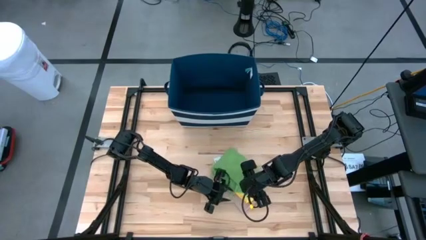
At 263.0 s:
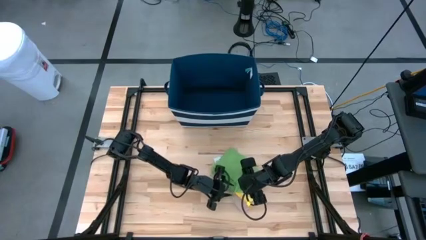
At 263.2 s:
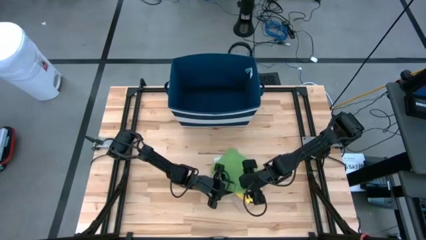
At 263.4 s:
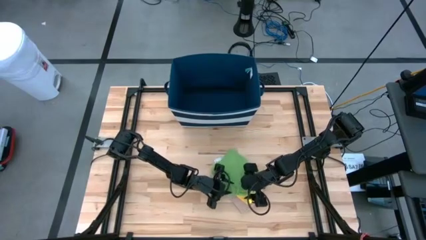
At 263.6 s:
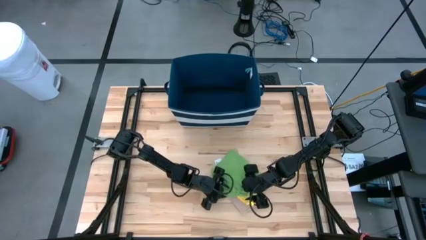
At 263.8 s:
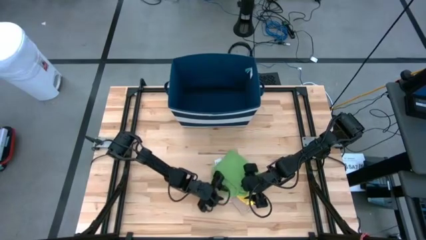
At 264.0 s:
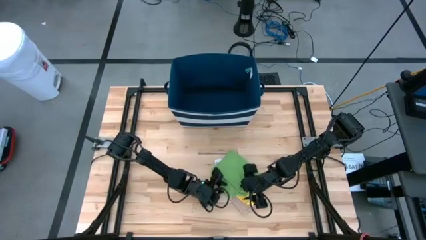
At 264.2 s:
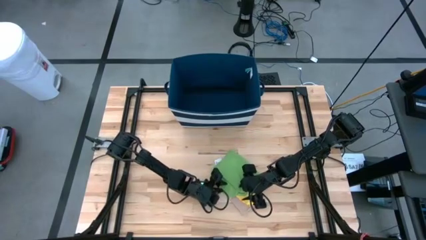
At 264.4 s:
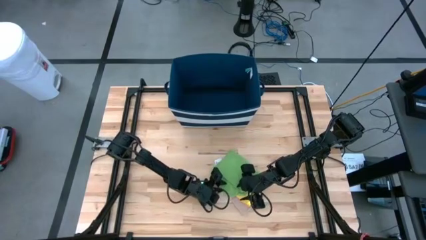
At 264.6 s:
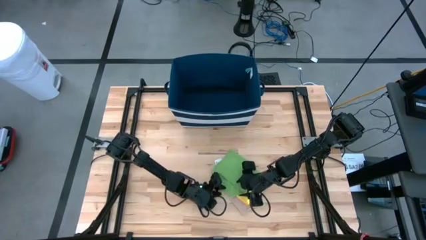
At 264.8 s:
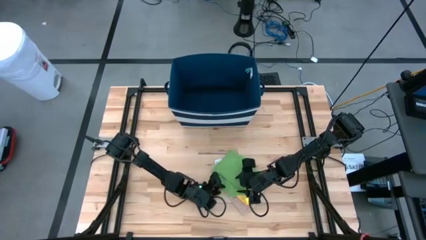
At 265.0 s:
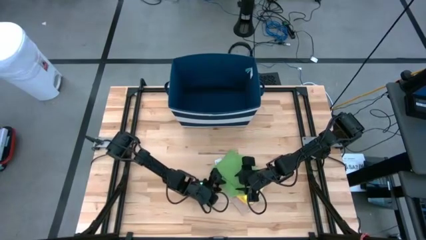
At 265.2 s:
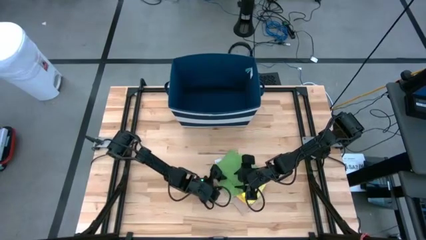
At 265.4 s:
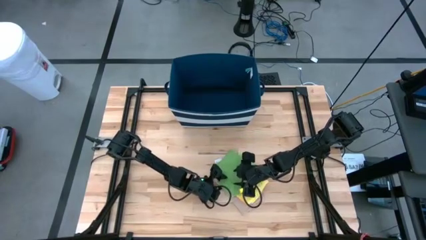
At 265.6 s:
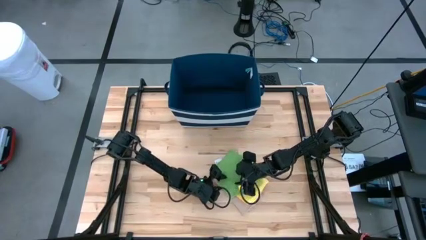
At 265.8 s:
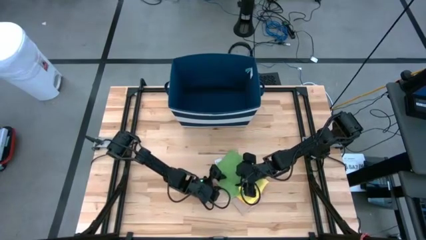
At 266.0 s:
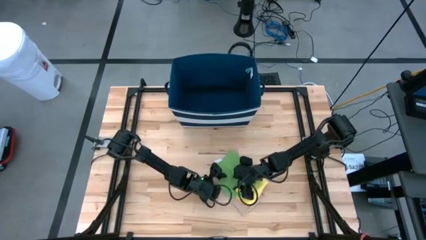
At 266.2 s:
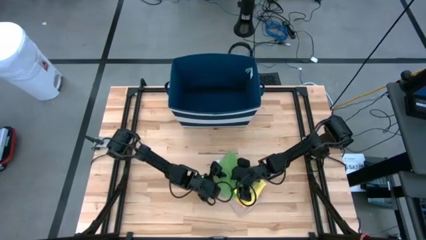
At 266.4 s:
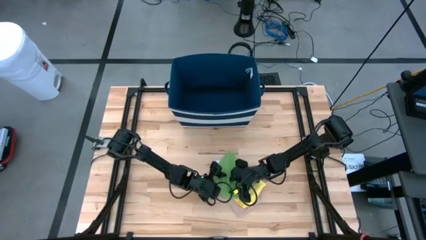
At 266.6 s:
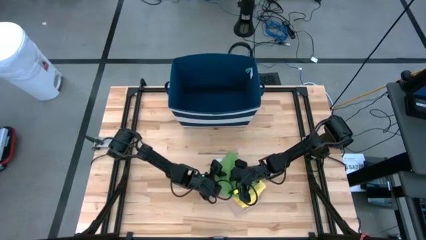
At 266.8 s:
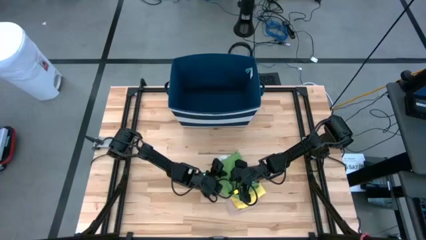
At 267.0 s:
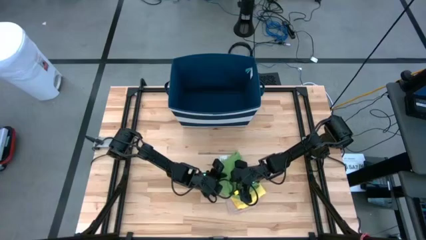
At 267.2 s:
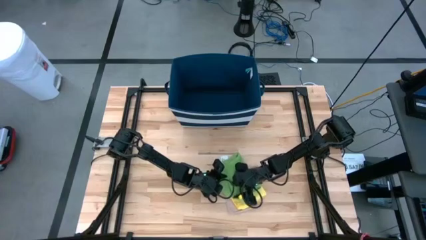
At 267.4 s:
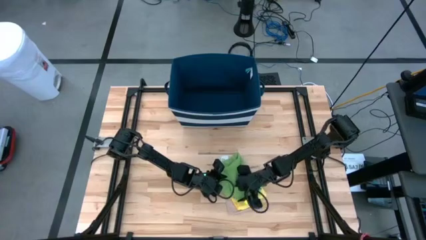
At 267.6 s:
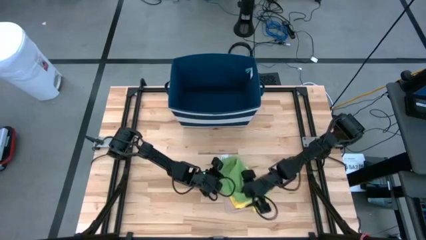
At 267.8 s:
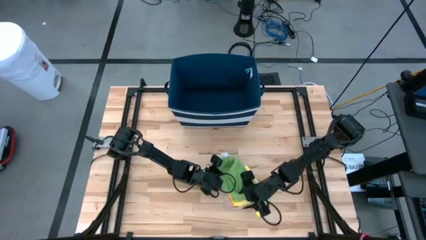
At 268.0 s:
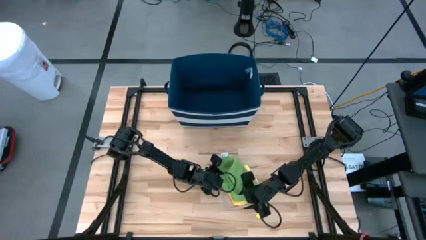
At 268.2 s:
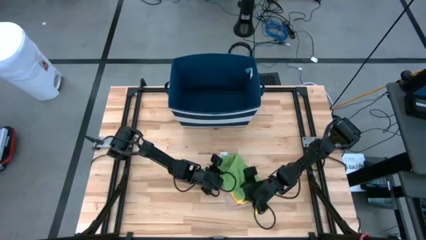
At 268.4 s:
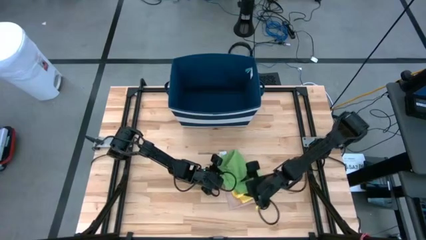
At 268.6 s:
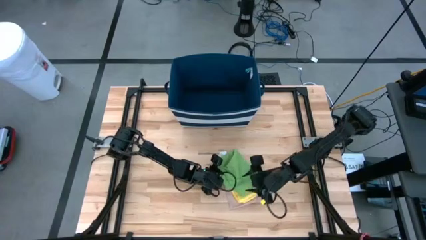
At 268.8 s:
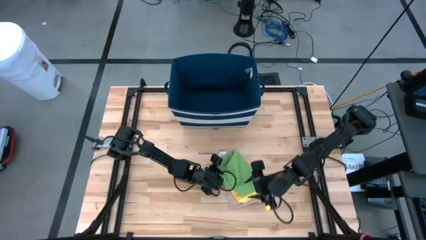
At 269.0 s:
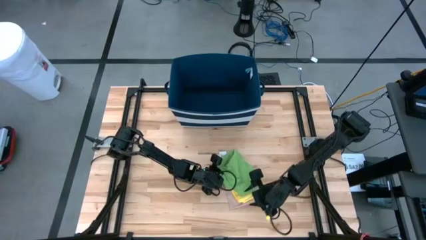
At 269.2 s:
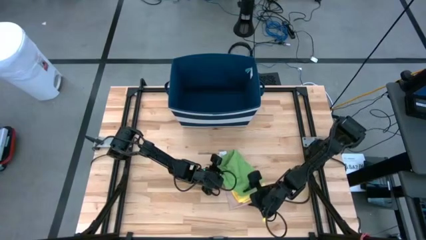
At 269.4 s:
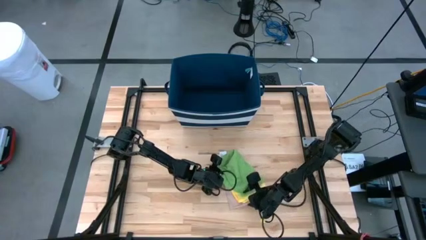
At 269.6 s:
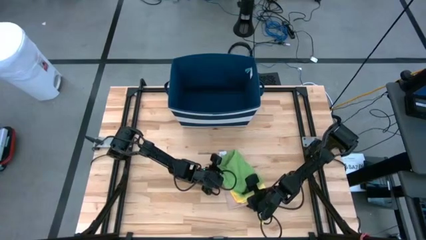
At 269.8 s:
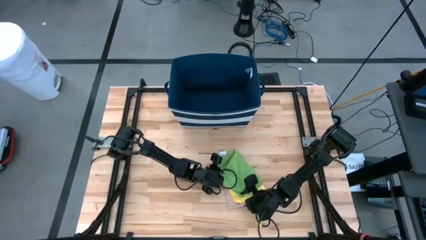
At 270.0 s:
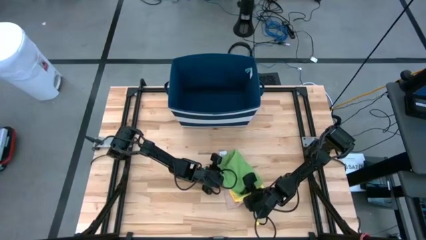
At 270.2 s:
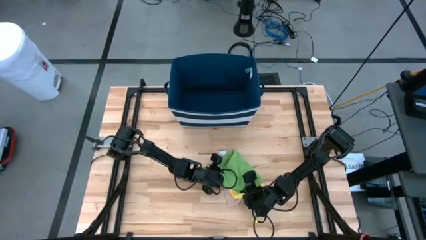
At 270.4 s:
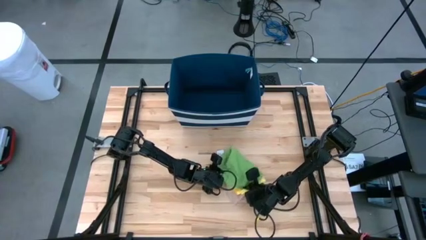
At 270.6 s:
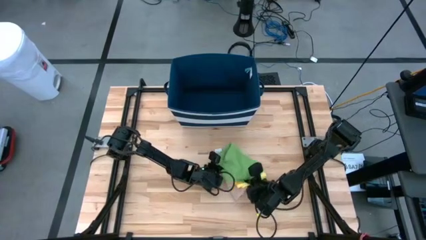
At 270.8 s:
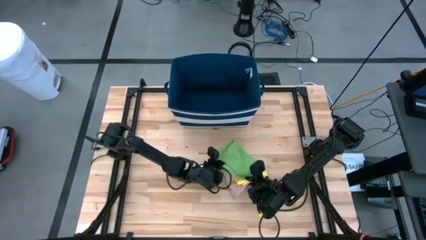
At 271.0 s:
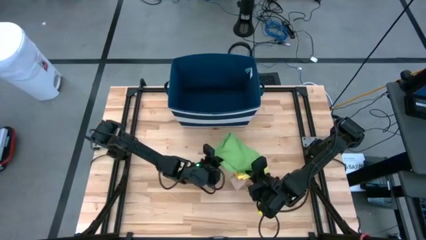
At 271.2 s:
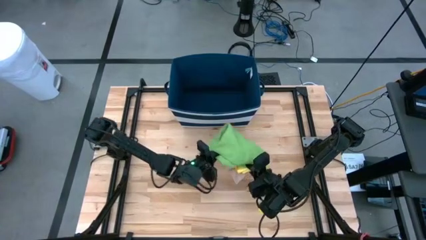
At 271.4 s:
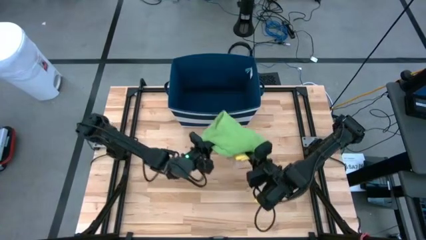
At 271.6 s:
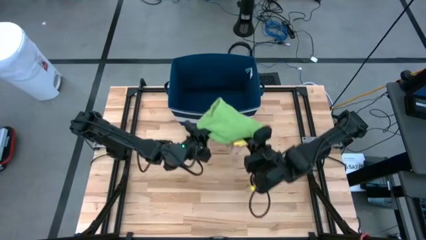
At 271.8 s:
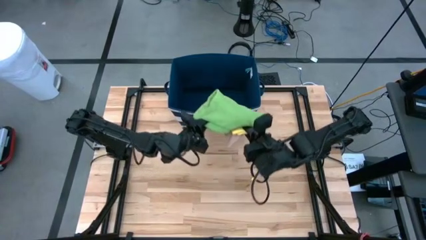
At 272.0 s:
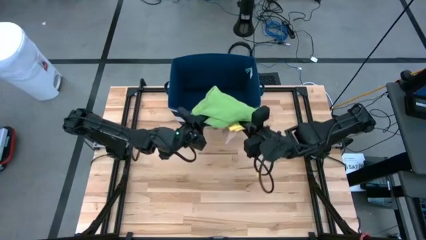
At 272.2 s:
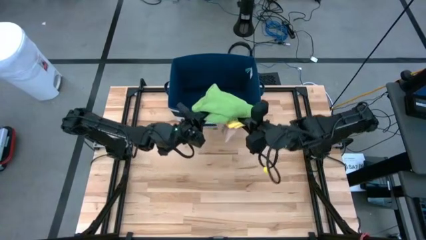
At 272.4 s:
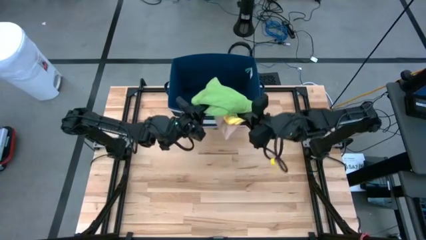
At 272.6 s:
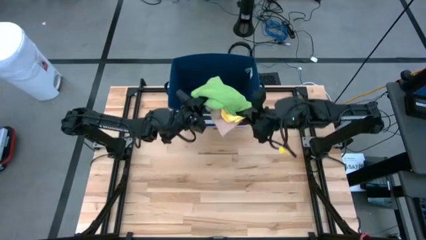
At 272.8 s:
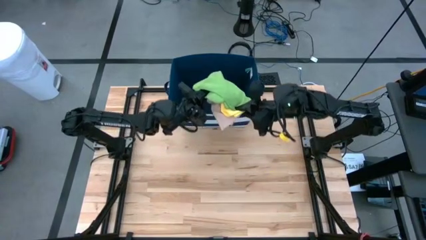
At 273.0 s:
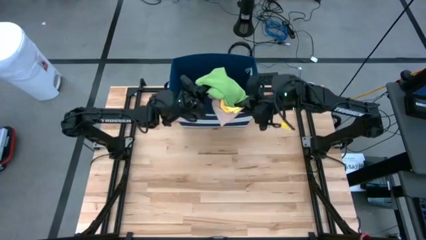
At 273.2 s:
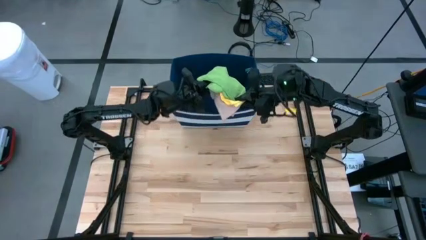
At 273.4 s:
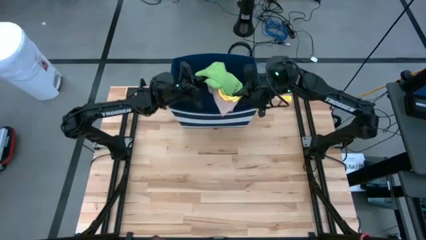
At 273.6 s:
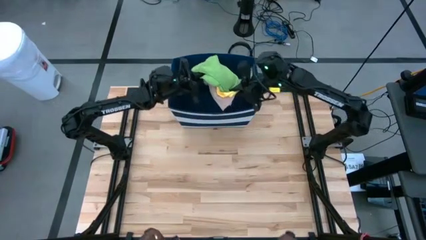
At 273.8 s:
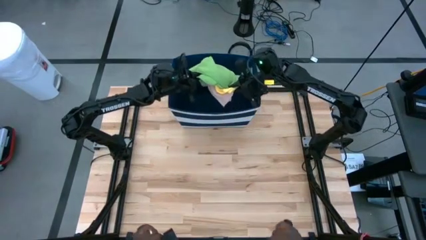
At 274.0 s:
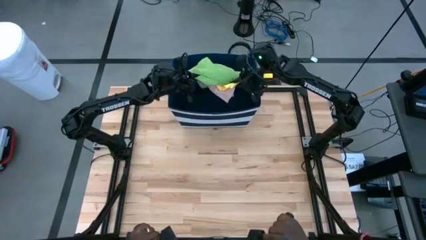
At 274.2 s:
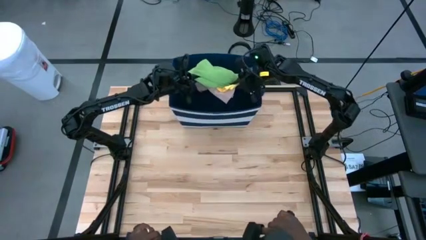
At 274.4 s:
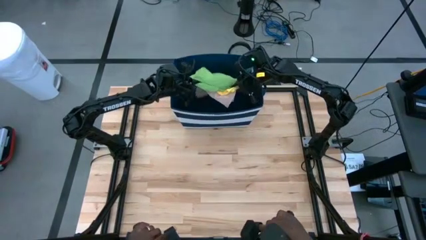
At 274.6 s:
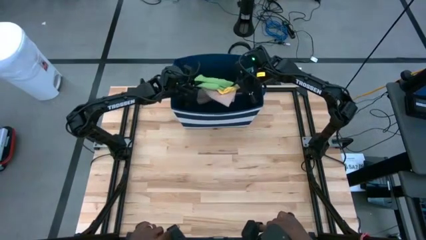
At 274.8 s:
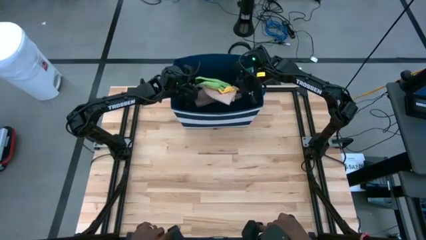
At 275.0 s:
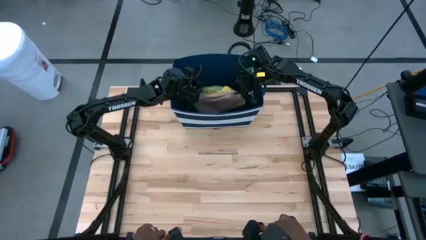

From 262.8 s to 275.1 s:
Task: Fold towel
Put the stacked towels into the laundry bin

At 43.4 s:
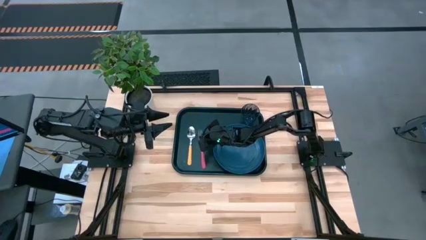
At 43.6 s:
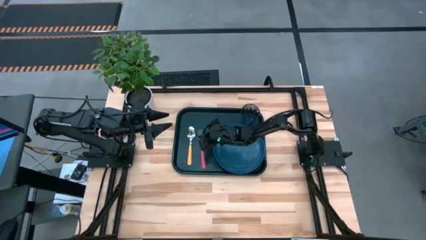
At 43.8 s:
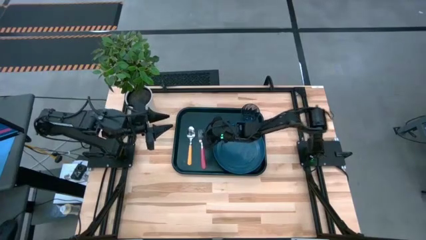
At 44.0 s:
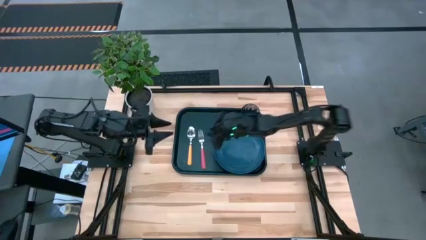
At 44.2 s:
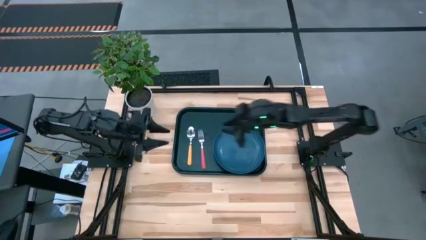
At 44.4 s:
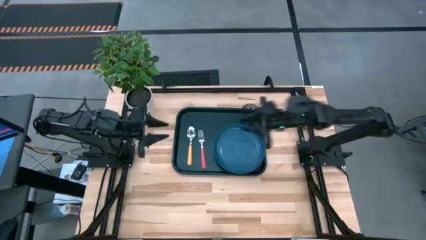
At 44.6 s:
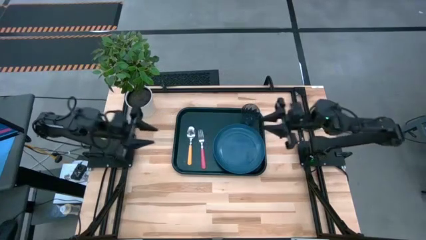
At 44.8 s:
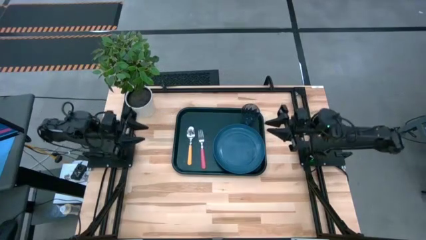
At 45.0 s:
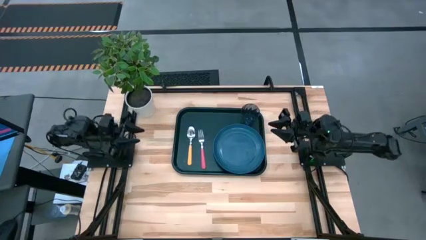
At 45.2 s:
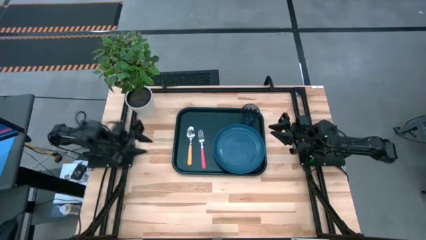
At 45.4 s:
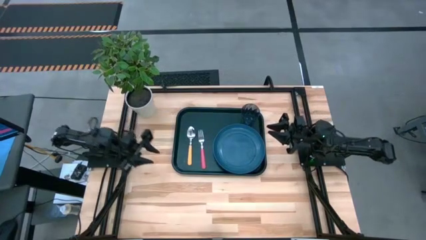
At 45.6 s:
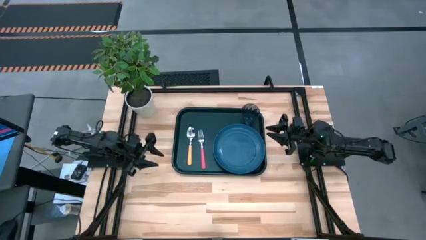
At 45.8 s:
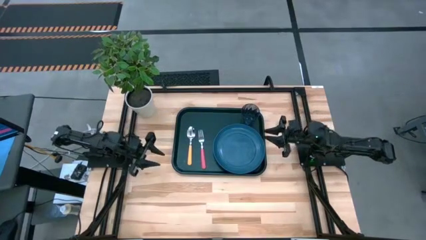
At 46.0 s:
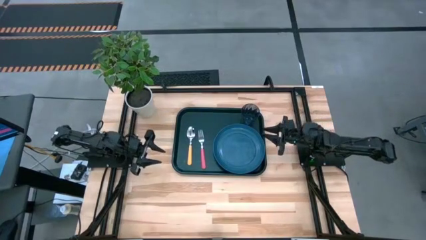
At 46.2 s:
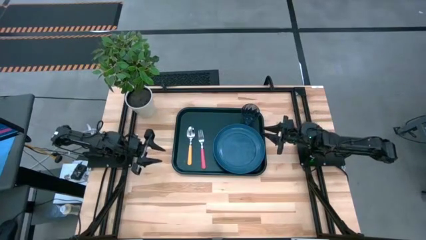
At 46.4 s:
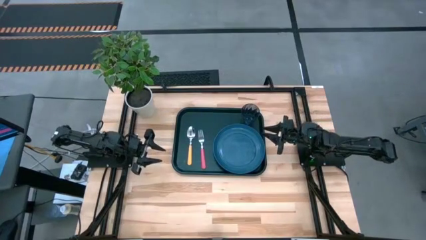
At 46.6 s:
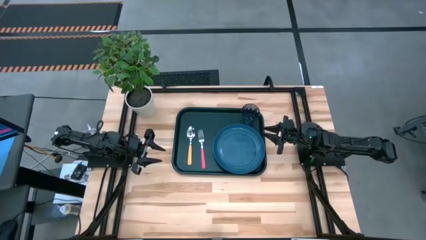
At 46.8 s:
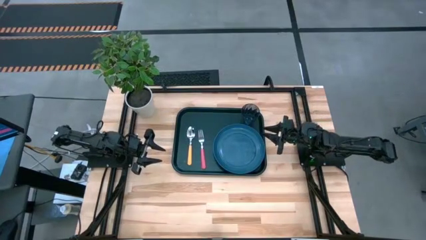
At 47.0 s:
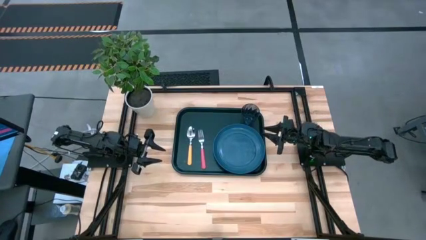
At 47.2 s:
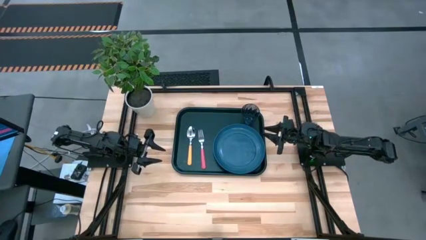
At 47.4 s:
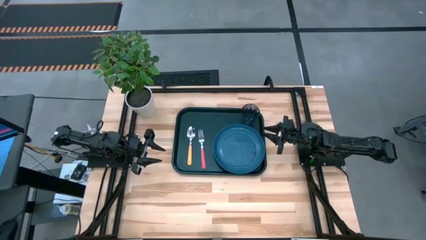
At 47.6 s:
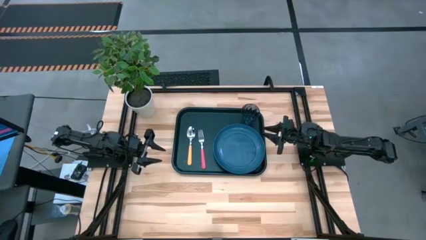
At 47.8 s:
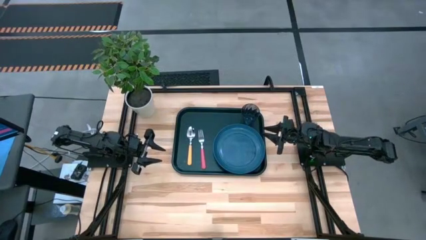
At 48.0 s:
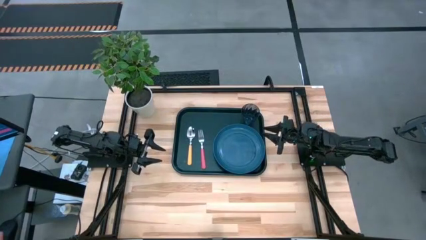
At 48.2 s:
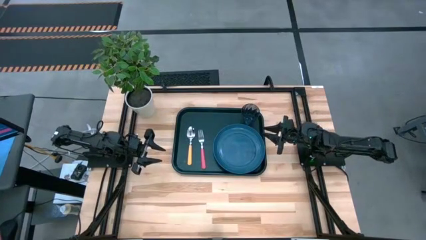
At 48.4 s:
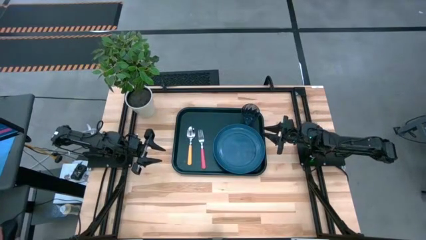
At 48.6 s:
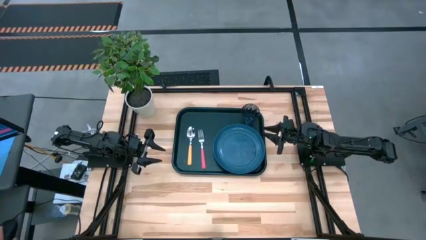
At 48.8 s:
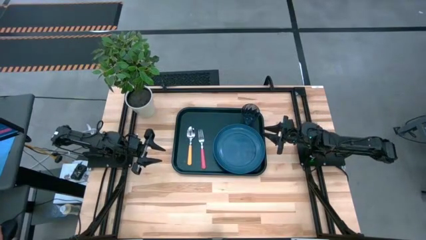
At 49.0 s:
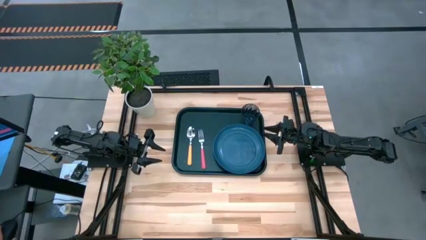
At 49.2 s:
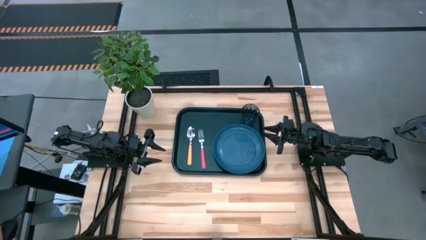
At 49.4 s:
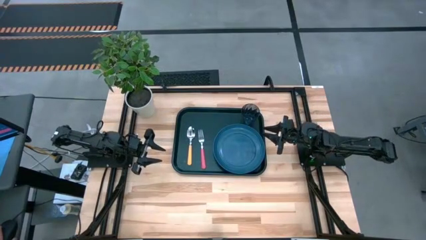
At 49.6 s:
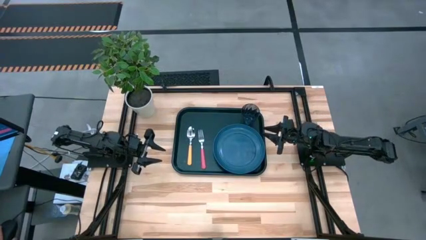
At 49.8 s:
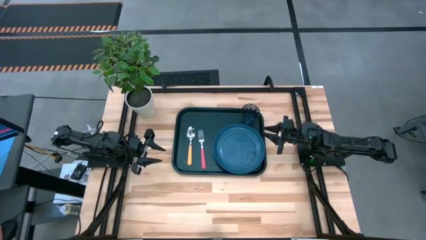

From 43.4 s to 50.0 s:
Task: Pick and place plate/cup/fork/spoon on tray
Return to Home Position
